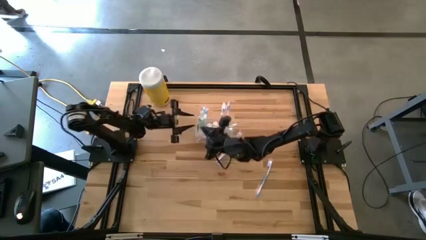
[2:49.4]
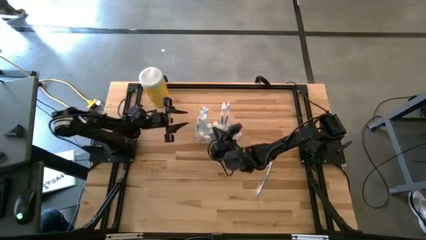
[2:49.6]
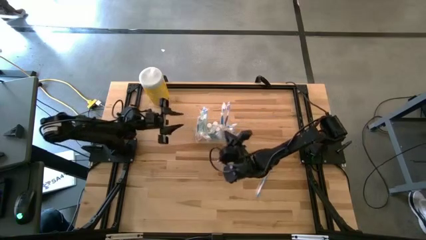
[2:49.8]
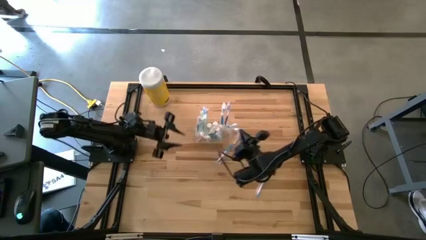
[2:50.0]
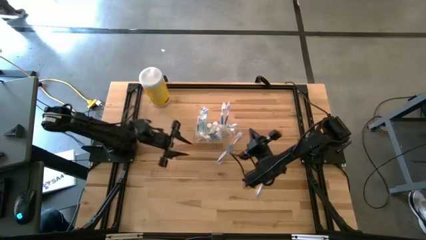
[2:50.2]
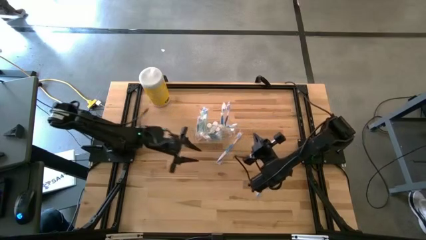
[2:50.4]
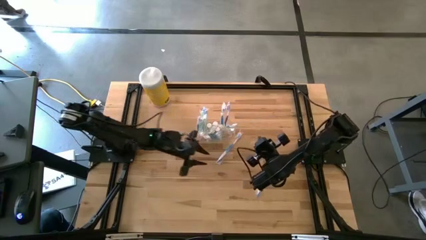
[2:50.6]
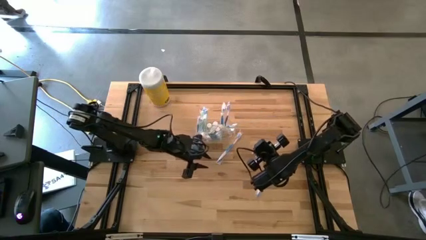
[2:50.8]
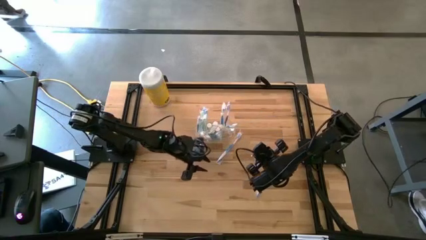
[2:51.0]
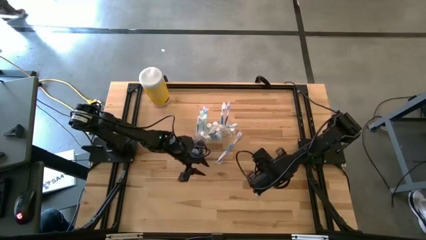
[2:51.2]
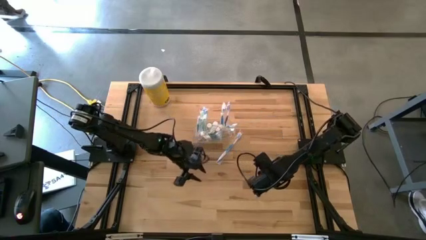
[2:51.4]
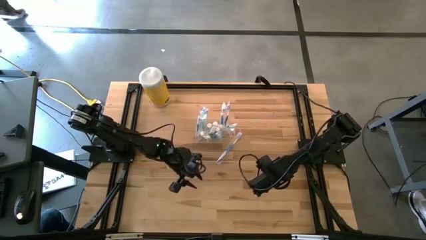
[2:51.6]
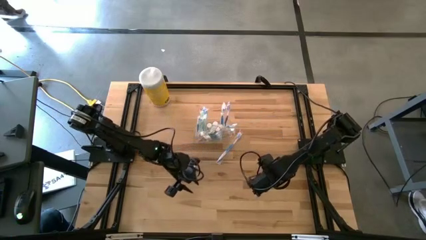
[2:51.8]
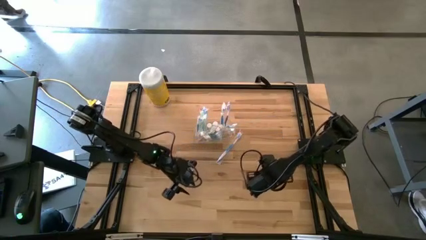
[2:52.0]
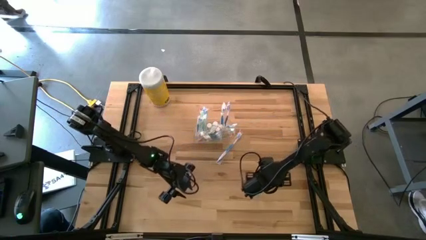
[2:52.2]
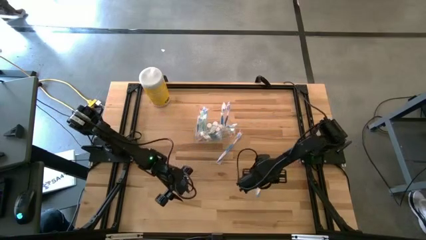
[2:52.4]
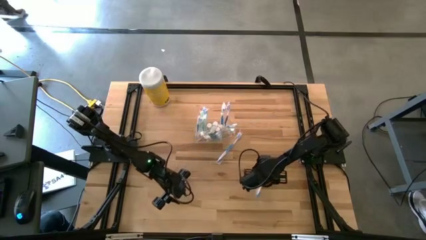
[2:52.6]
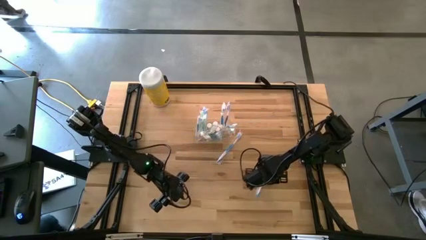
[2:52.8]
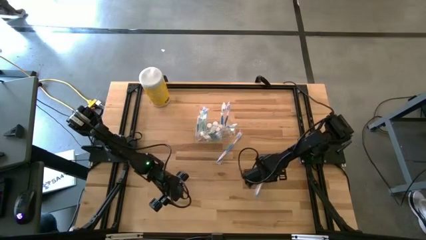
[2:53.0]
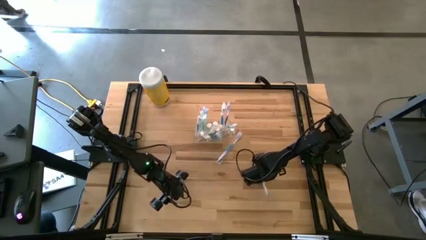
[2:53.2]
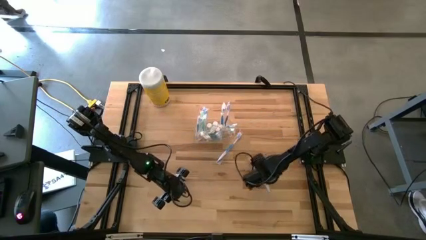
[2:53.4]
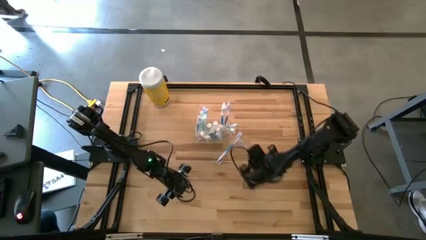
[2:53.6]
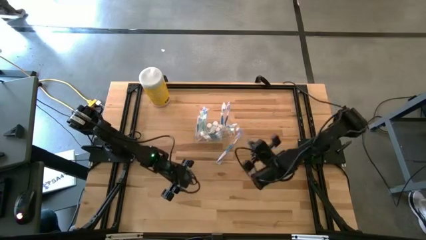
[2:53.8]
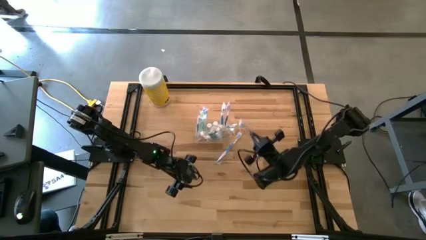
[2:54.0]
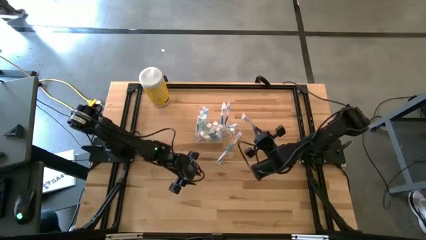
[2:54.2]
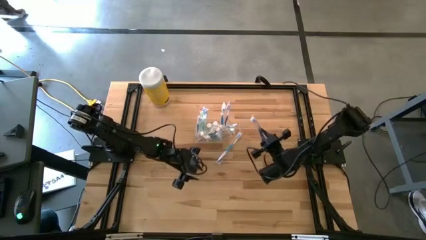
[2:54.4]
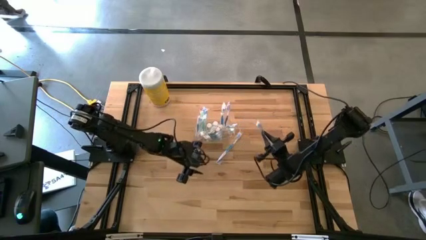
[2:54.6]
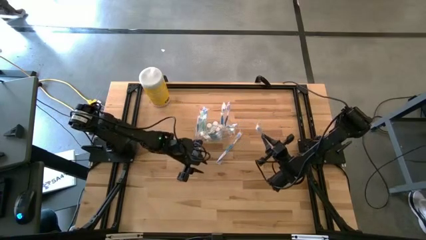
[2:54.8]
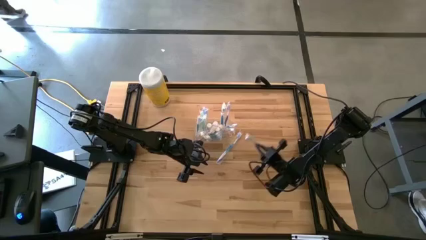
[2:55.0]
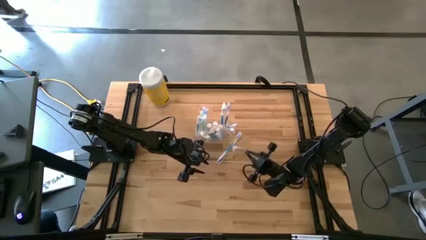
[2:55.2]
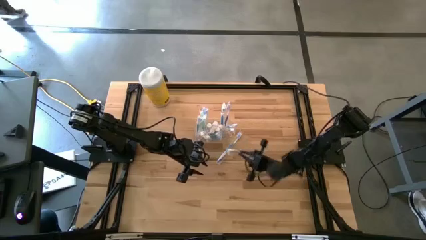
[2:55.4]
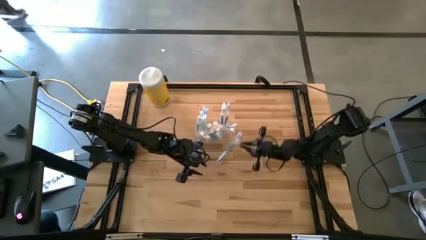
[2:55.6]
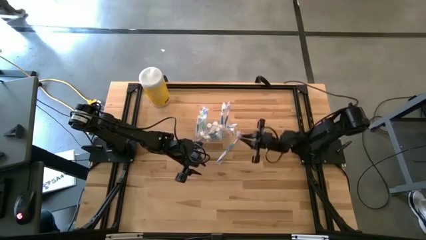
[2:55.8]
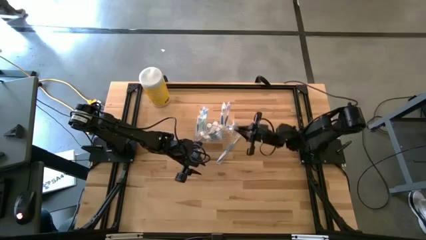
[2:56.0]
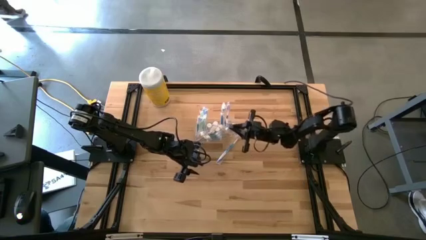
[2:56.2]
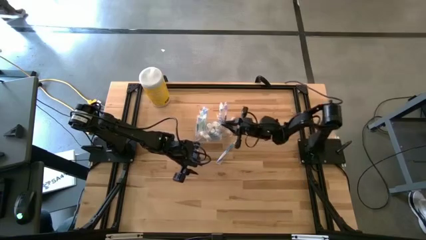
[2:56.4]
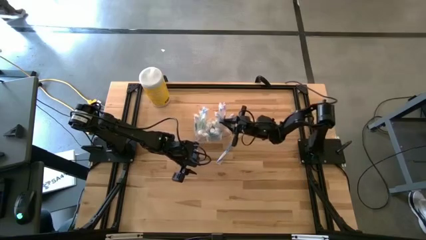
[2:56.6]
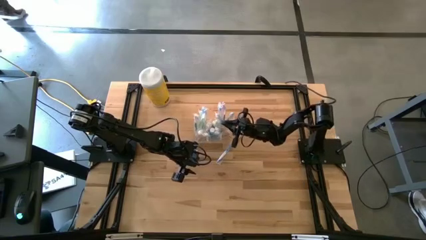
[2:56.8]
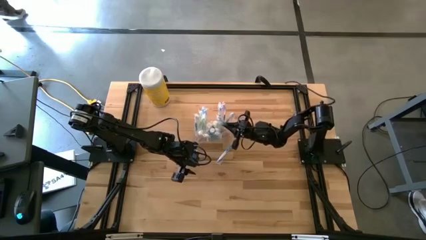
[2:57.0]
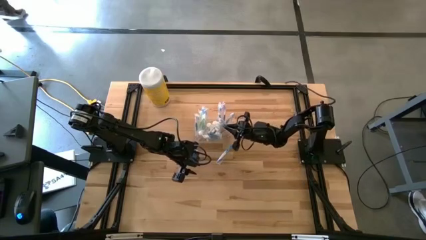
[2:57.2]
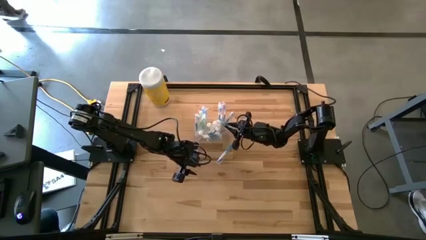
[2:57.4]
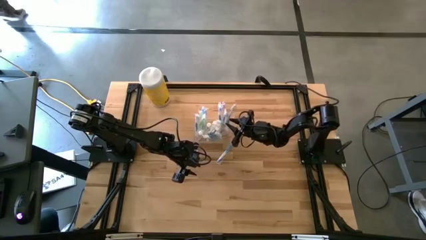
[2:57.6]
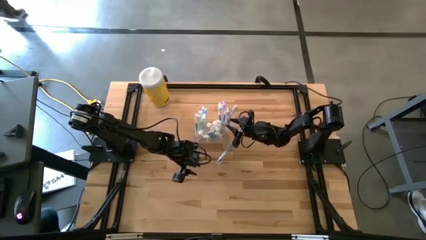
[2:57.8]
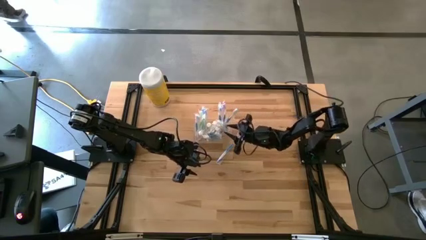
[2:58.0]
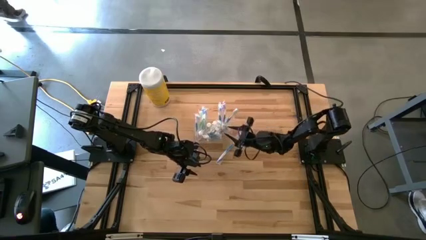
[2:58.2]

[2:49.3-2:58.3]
Task: Pick & Place toothbrushing station
Put the blue toothbrush into the transparent organizer

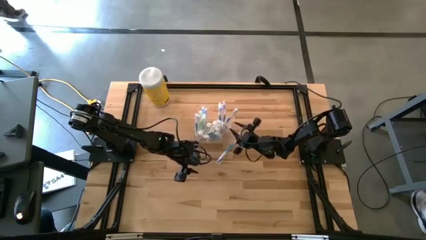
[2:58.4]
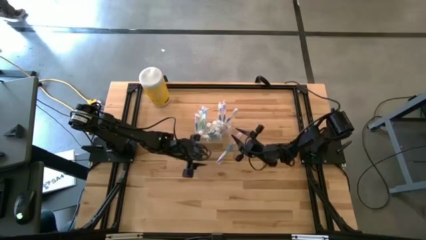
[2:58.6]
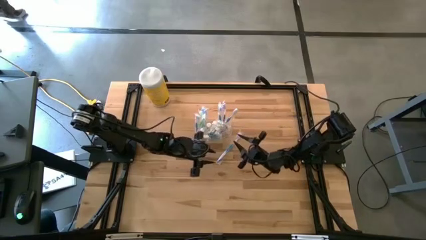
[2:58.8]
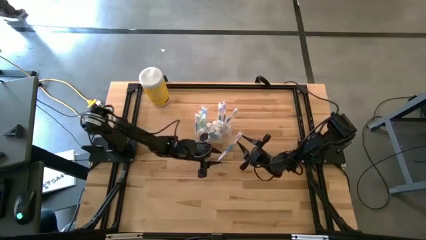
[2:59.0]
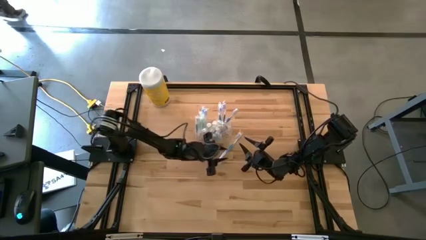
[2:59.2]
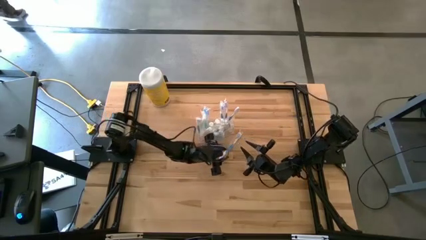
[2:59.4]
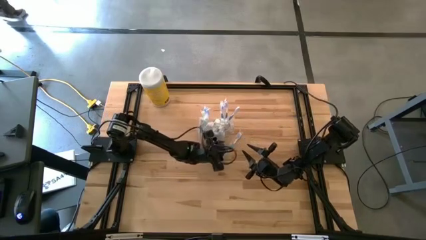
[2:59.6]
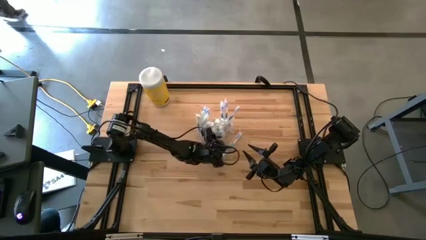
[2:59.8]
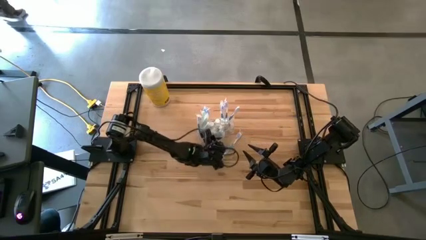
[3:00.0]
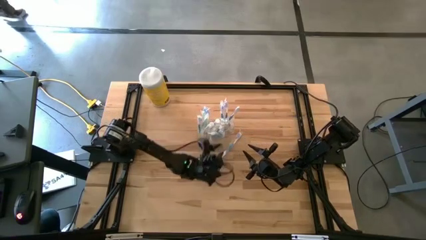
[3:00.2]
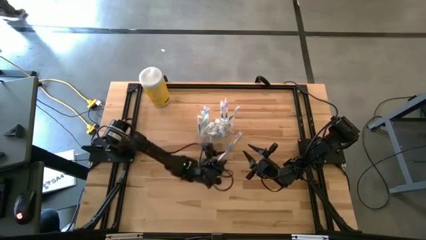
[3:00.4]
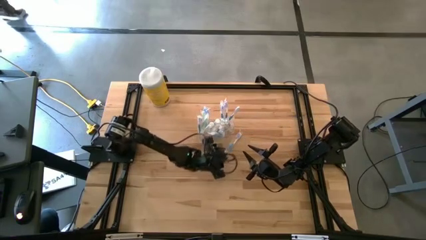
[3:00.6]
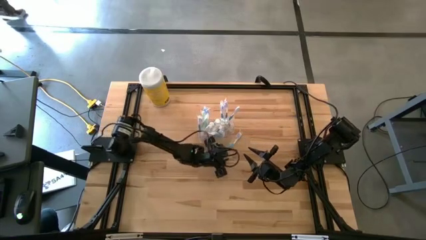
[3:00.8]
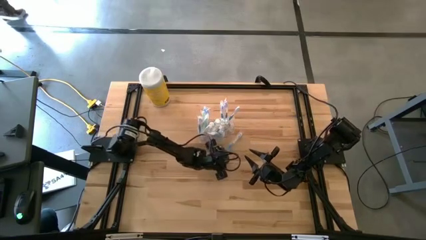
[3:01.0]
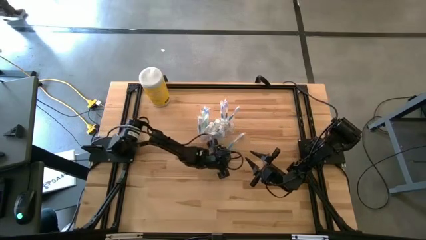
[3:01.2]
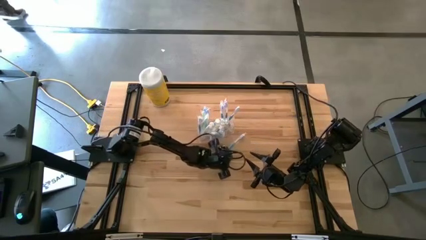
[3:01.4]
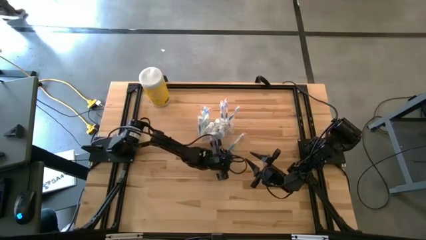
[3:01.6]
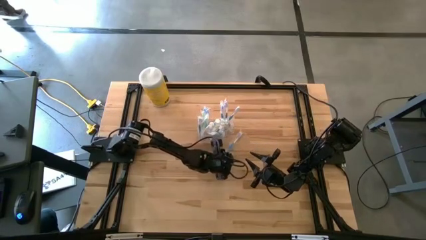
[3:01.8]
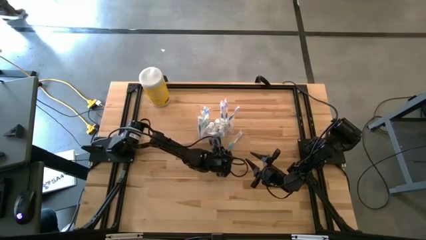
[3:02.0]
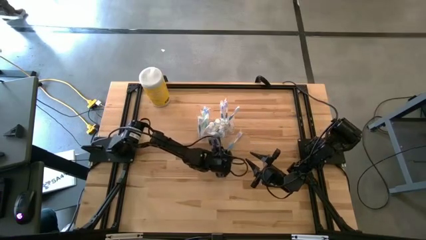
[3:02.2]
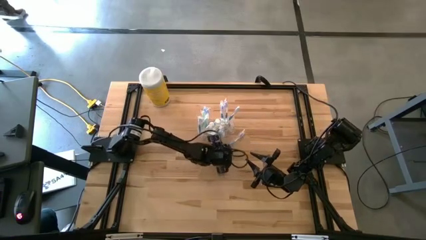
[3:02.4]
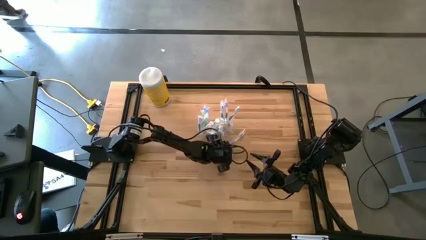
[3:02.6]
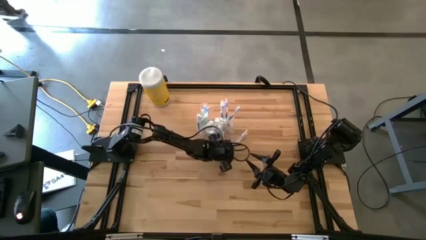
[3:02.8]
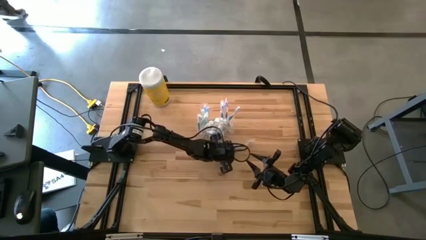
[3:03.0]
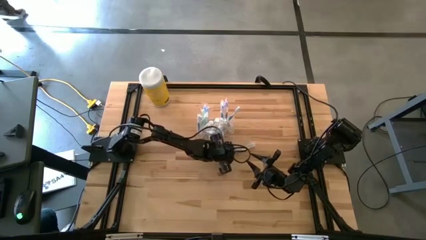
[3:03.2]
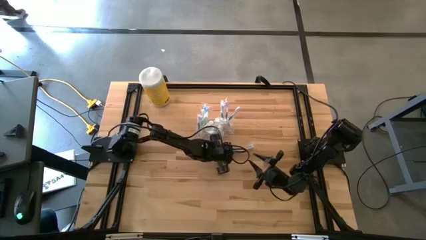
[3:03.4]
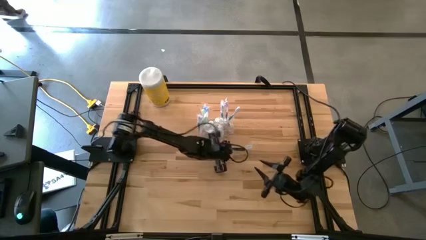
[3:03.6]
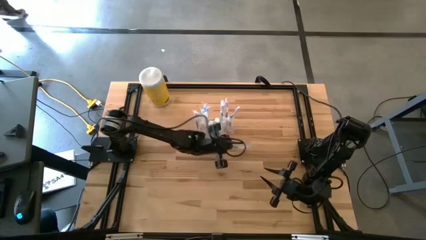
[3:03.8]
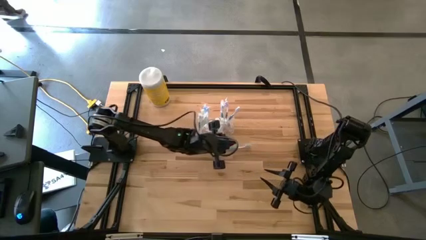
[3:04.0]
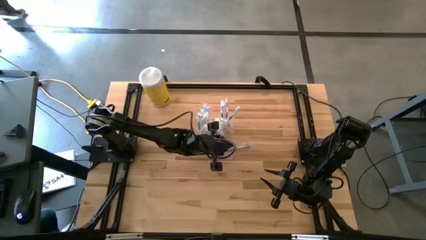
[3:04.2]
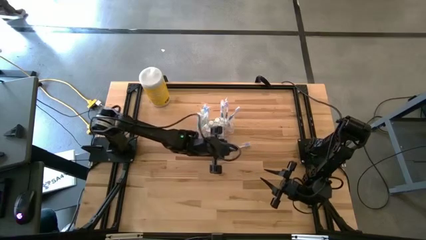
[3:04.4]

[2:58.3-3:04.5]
Put the blue toothbrush into the transparent organizer

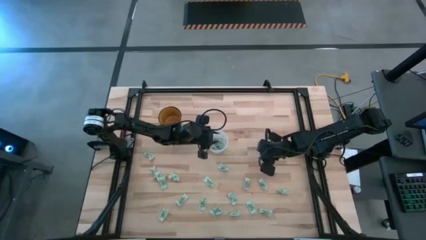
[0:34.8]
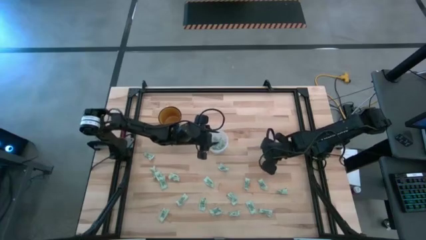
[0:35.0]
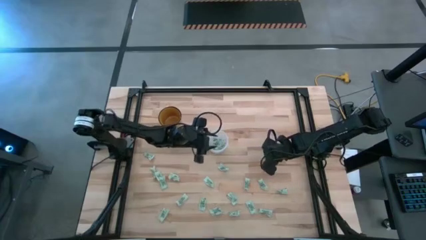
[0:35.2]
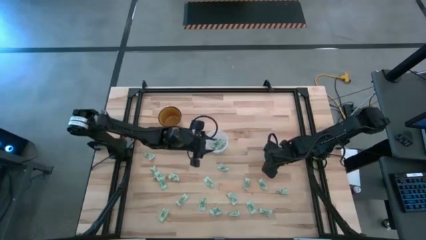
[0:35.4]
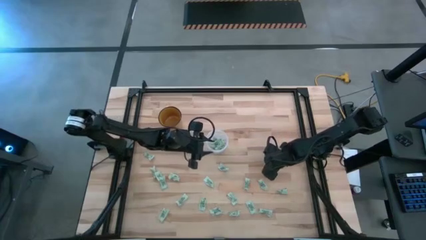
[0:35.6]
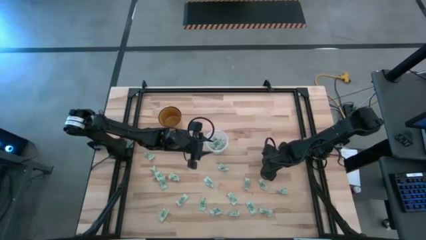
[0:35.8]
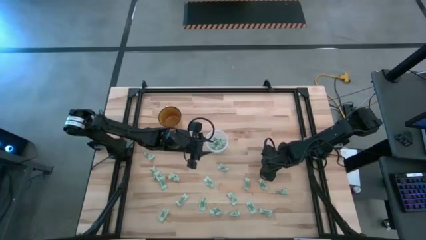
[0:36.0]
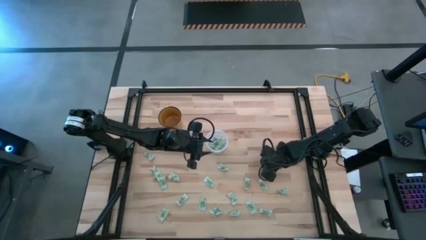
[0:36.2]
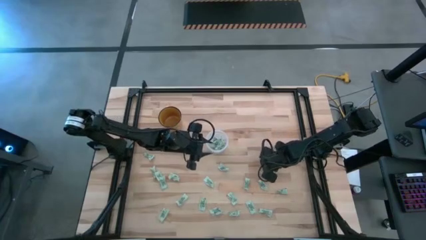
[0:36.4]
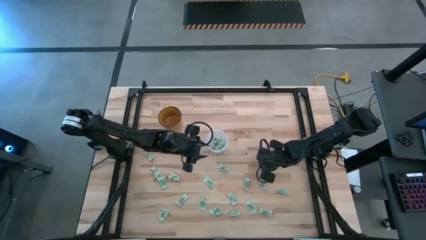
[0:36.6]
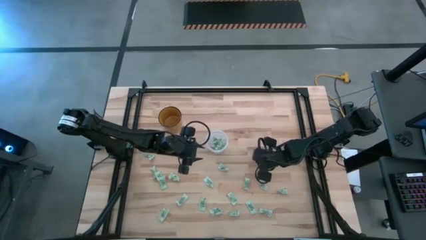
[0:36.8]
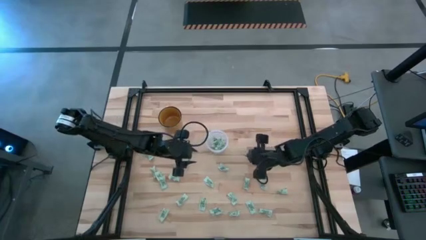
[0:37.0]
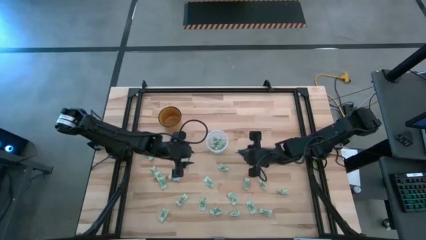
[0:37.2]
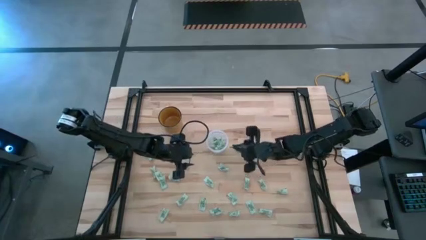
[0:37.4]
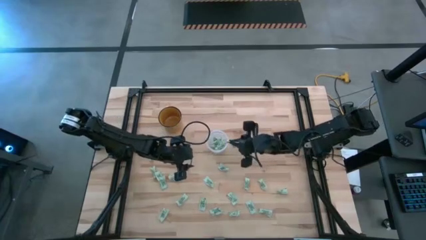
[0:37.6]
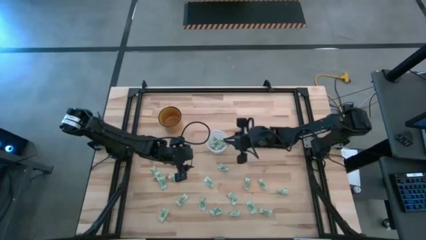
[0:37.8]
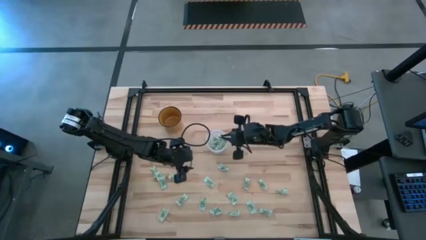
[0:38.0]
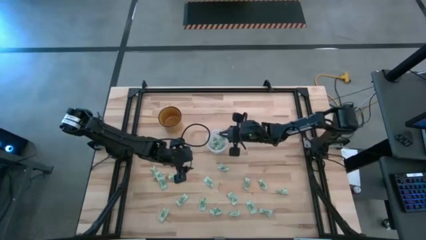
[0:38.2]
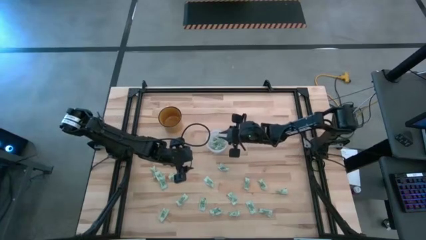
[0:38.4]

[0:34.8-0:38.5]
Task: Pick and place Stevia / Truvia into bins
Put the stevia packet into the transparent container
